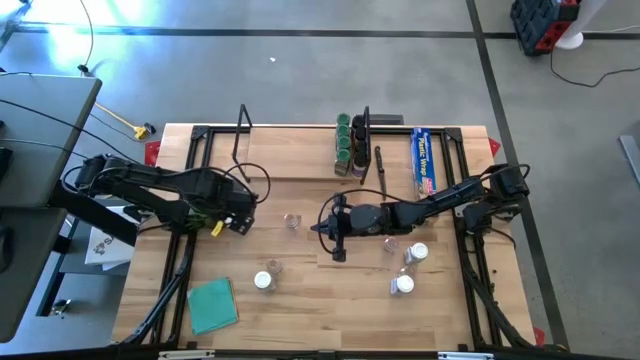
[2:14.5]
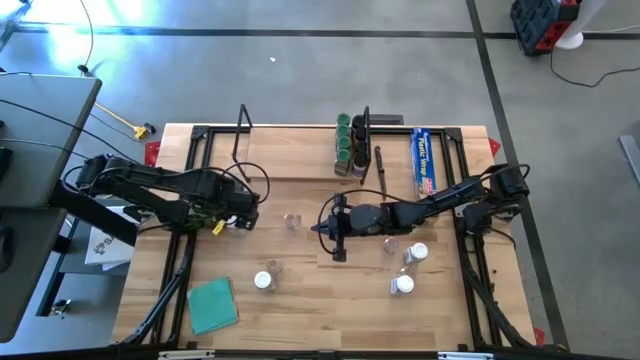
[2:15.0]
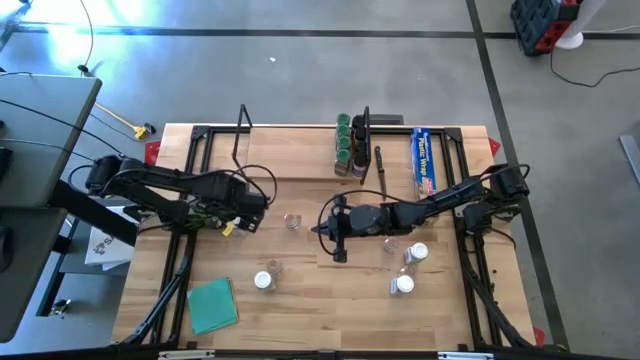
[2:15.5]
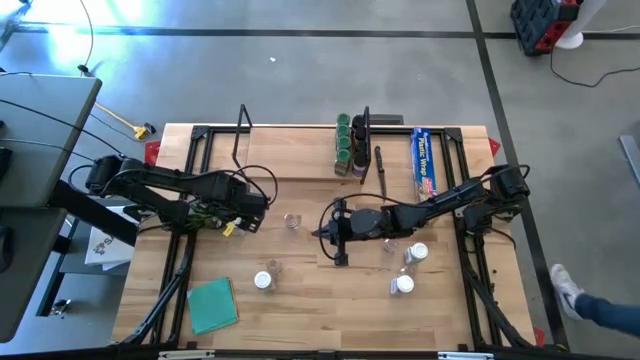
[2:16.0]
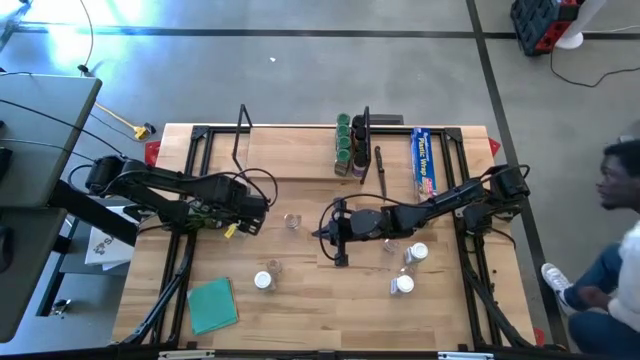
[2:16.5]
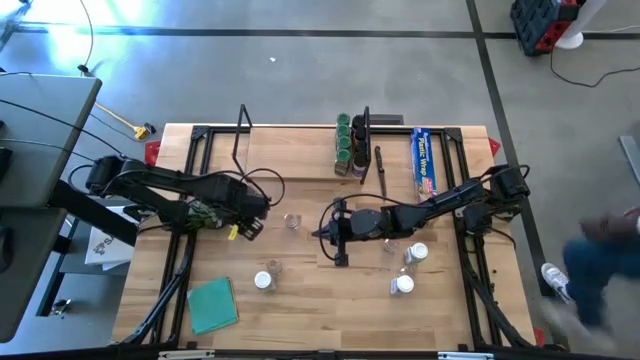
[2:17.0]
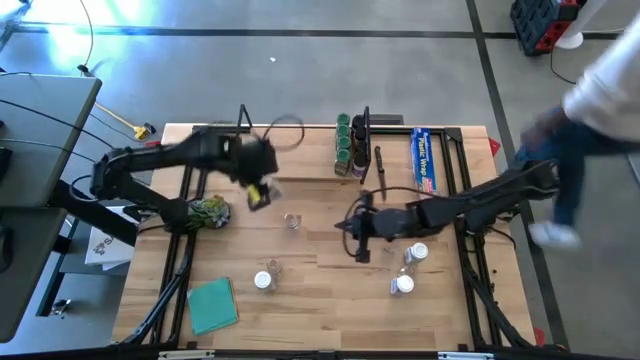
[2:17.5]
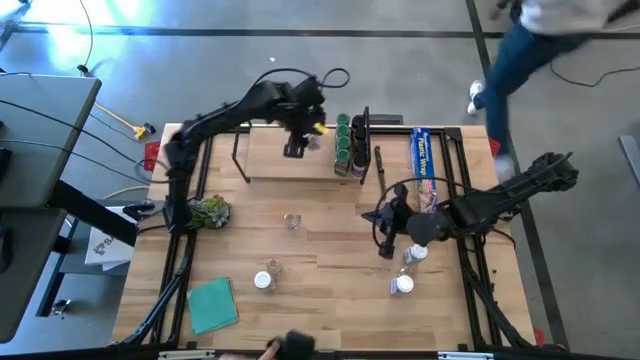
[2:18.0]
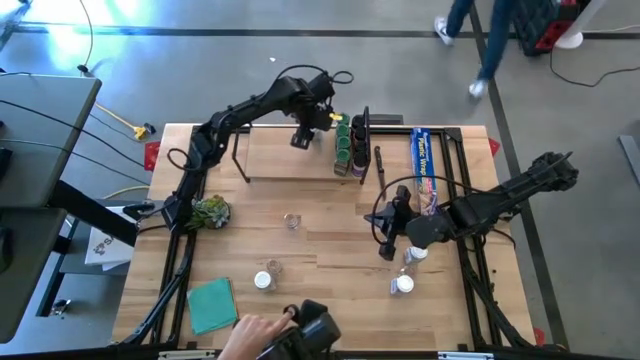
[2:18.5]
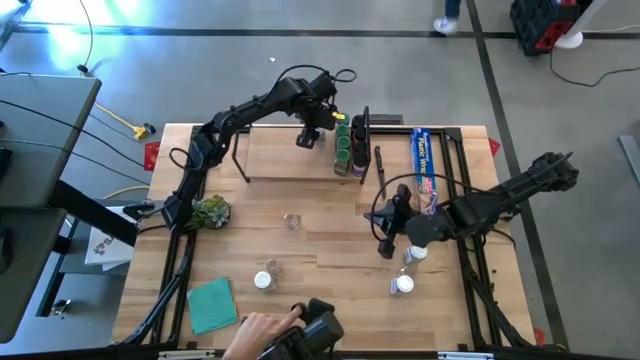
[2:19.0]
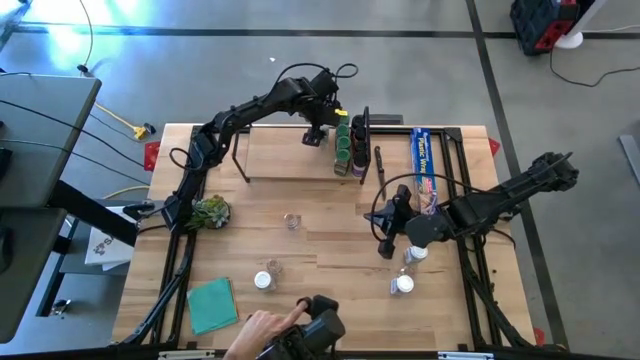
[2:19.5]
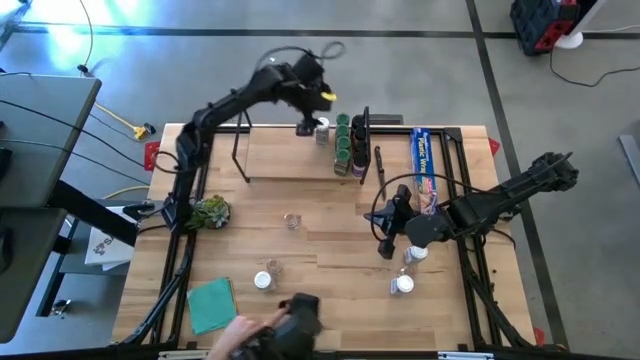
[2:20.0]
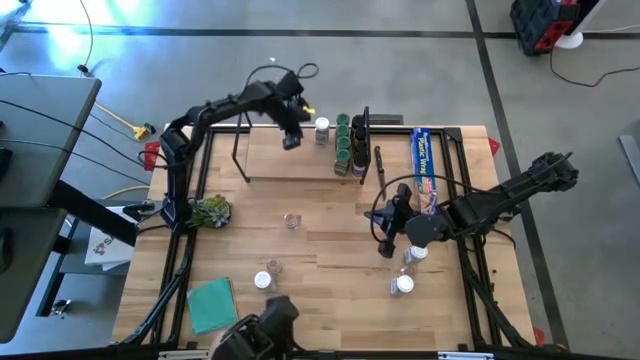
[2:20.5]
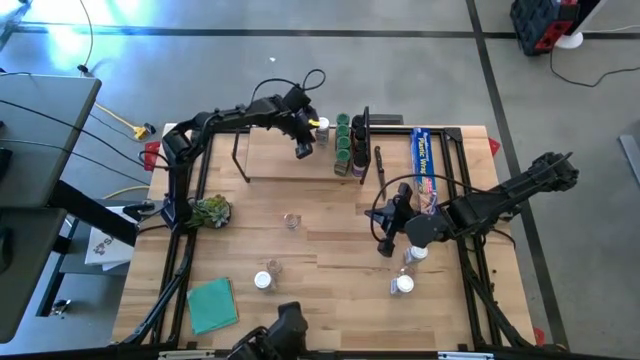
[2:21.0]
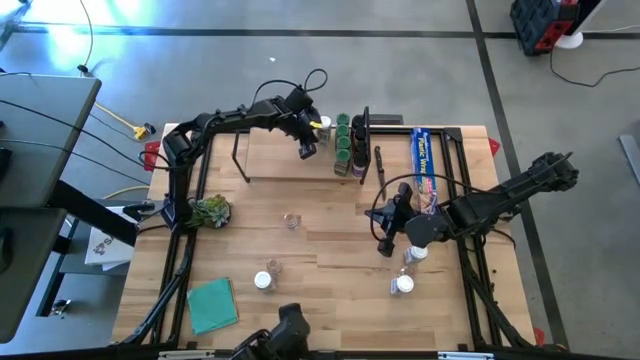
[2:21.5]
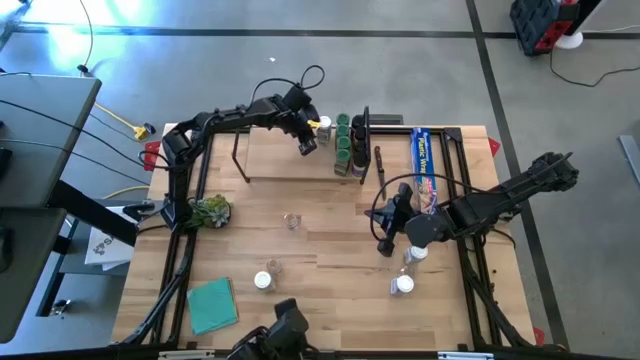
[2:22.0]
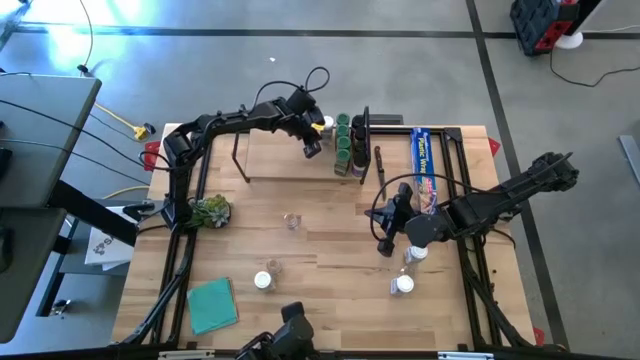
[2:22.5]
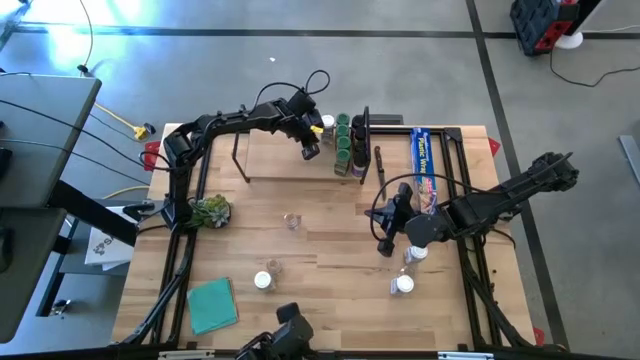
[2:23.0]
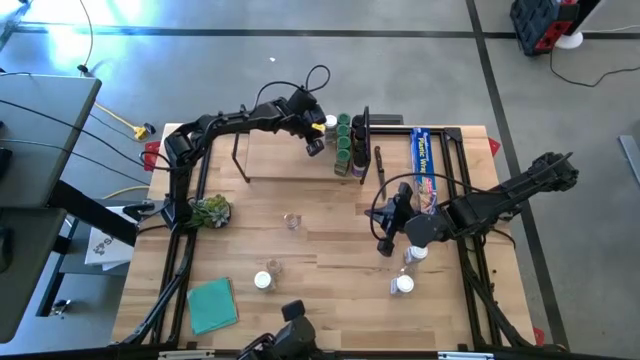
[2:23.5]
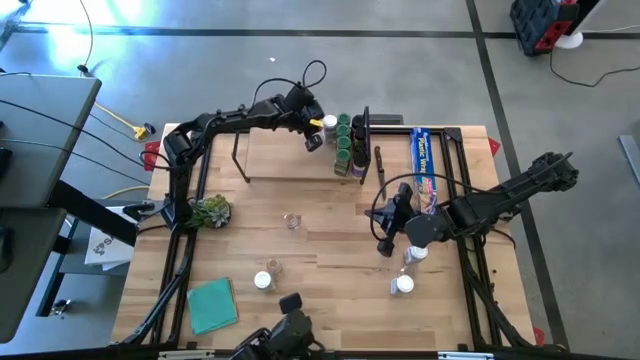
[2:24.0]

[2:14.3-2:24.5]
Task: Shelf spices
Put the white seasoning bottle on the shelf

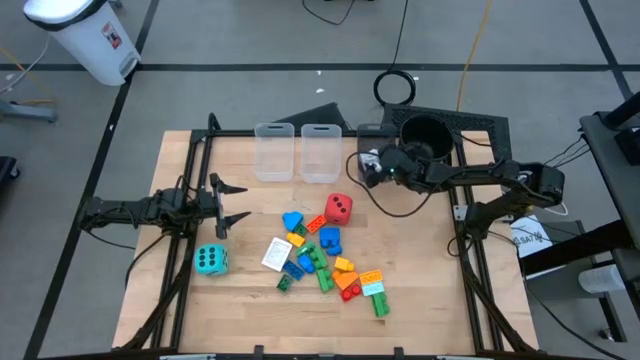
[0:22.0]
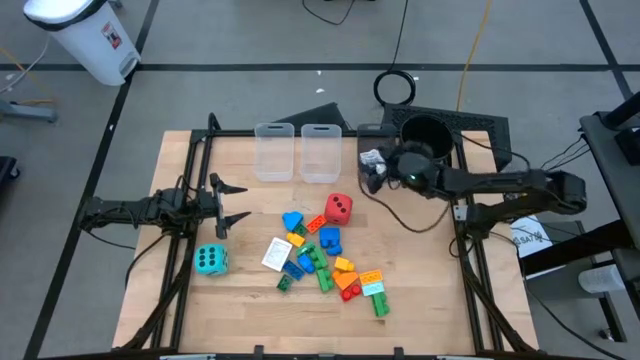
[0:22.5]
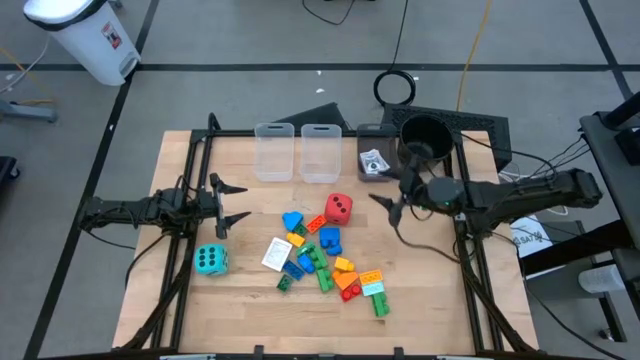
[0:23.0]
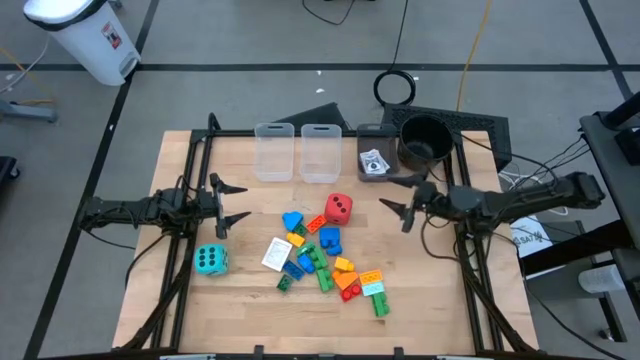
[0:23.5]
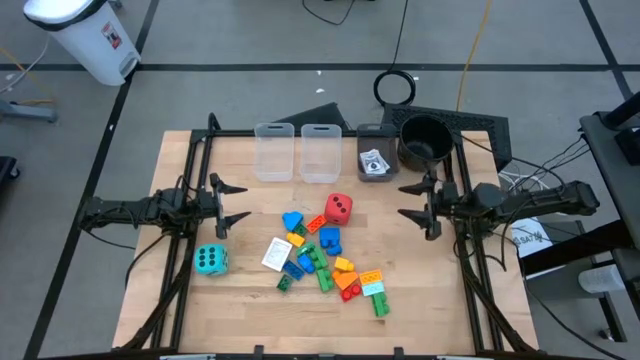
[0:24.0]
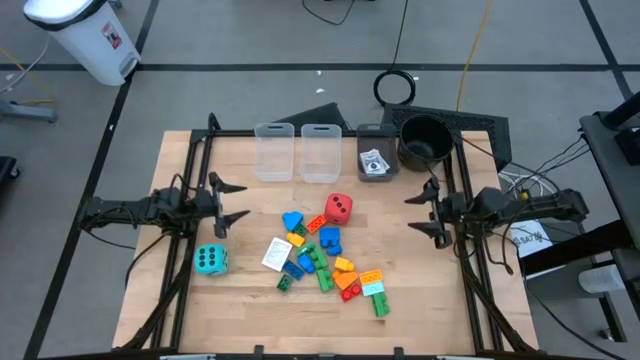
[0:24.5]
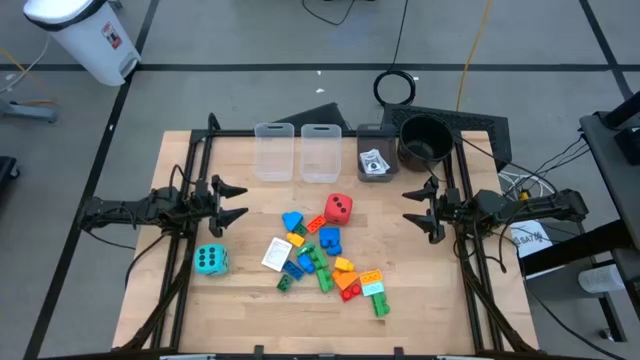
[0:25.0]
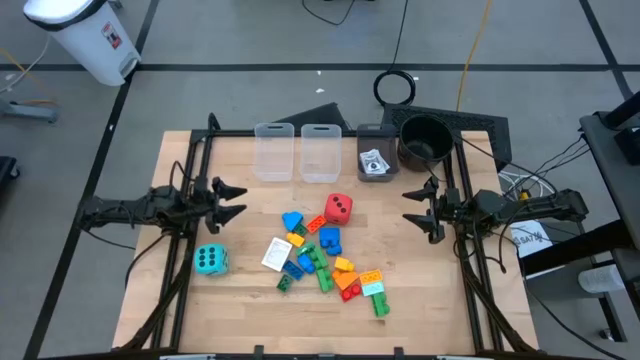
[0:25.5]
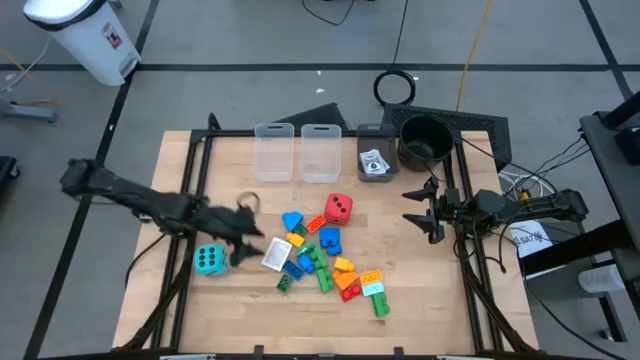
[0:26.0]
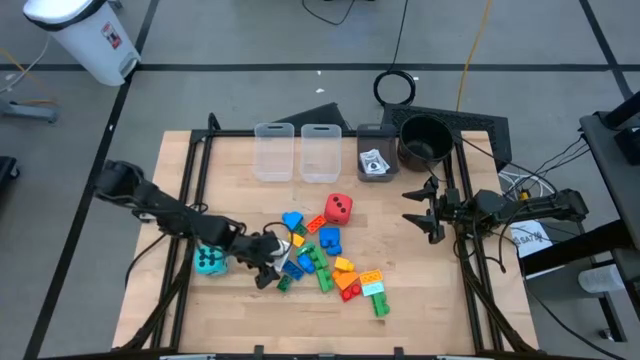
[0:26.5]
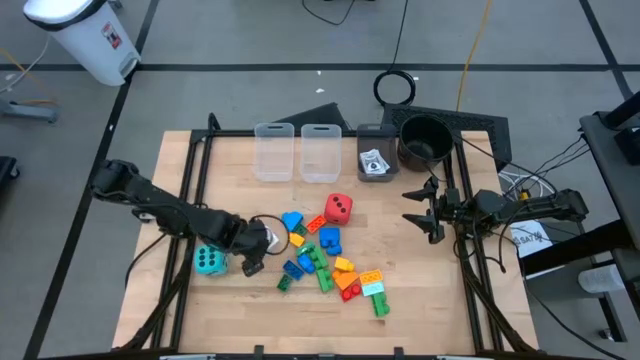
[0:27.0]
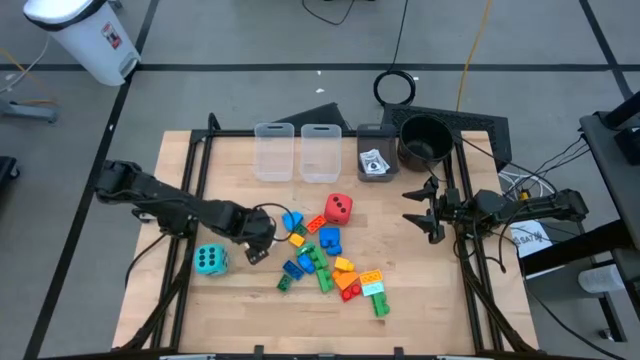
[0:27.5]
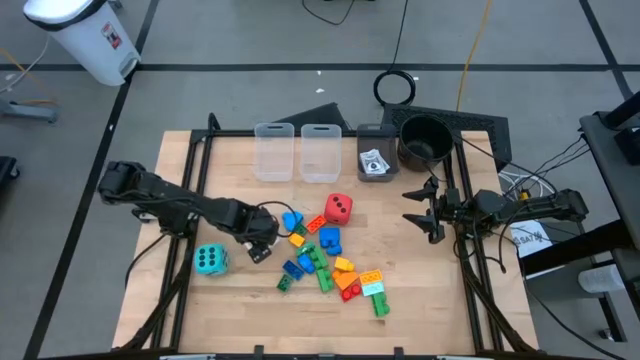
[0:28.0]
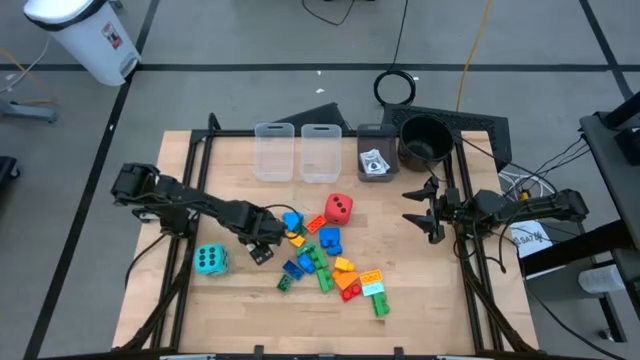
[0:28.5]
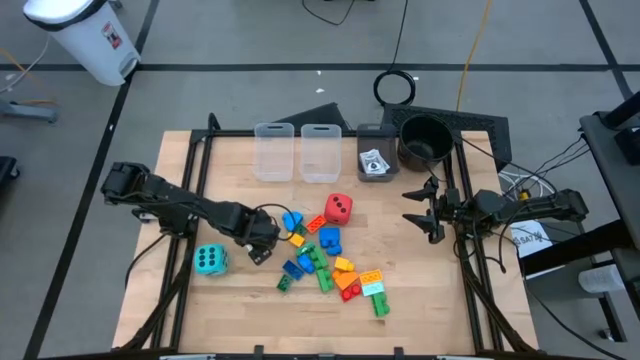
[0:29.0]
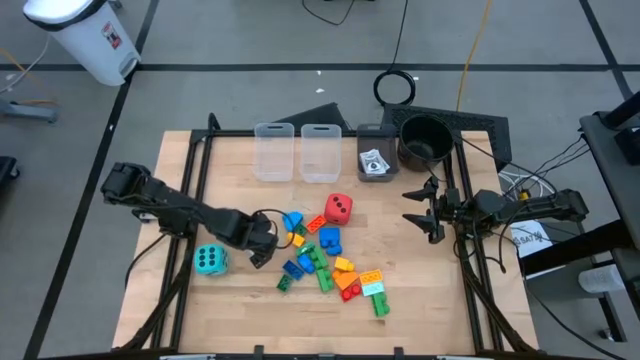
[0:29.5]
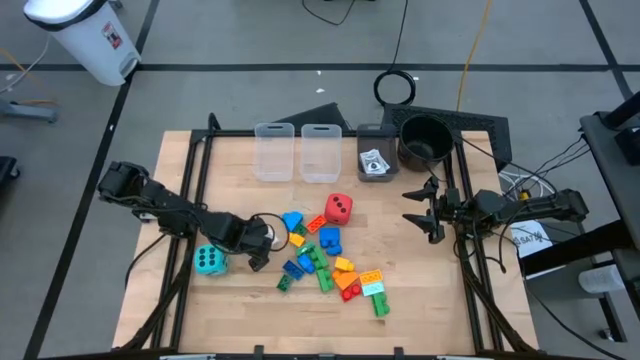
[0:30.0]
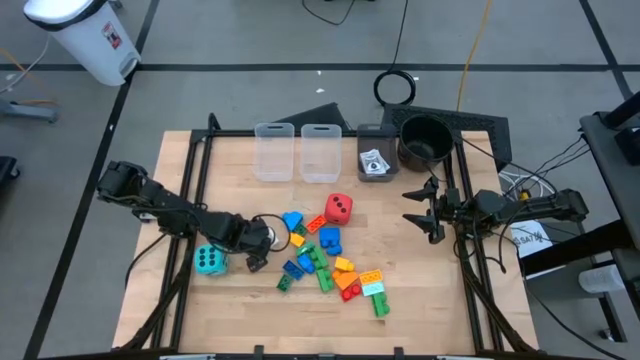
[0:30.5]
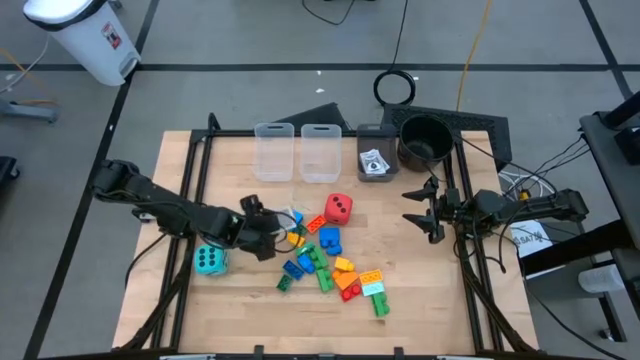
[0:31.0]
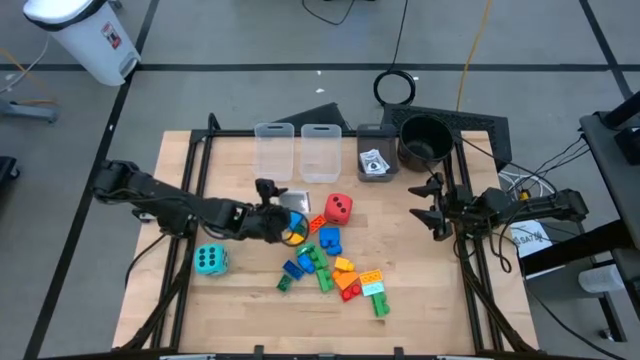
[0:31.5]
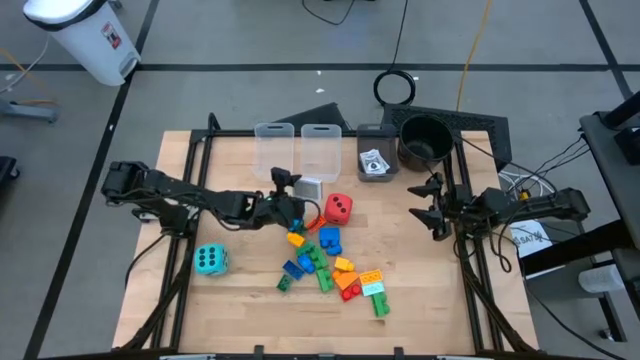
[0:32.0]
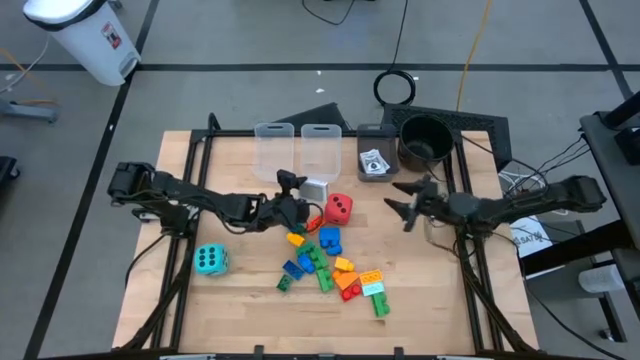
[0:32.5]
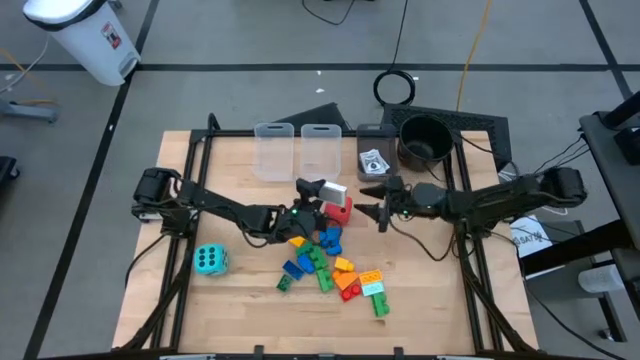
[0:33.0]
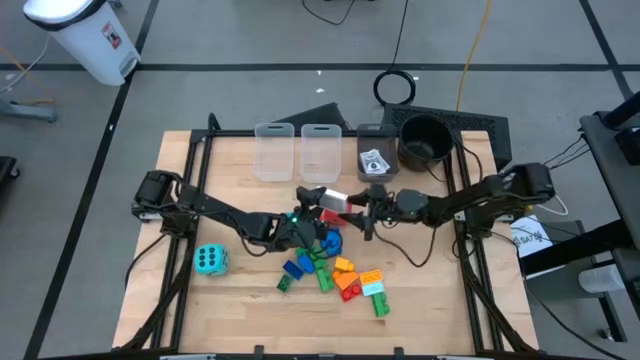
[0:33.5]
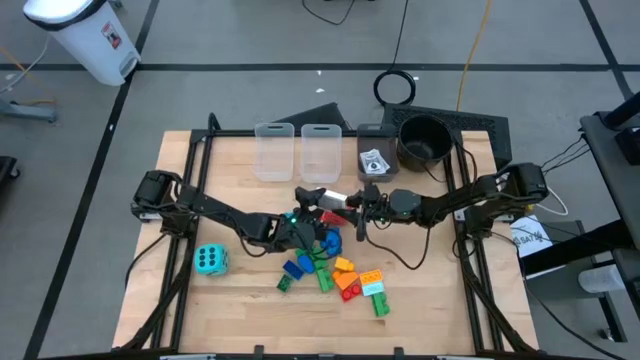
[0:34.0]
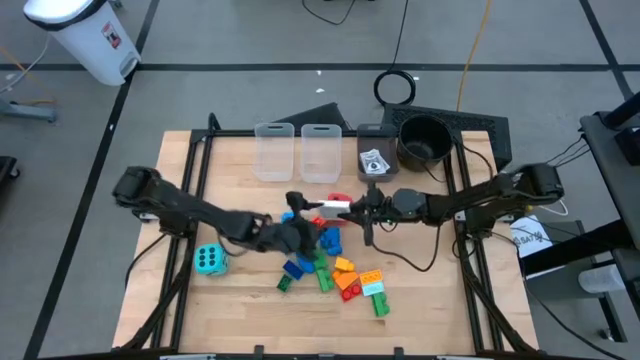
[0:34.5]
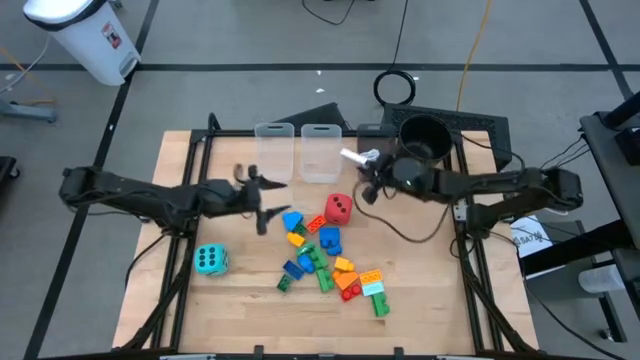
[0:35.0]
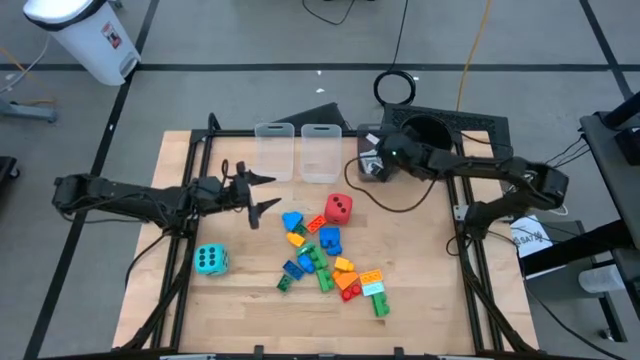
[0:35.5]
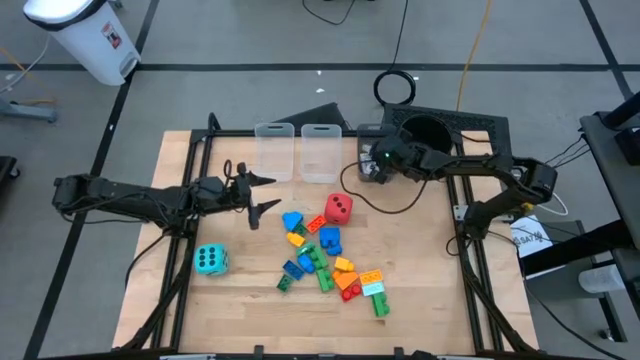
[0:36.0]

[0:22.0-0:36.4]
Task: Pick & Place Toys
Put the brown deck of cards into the black bin
